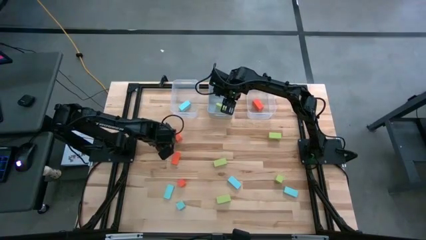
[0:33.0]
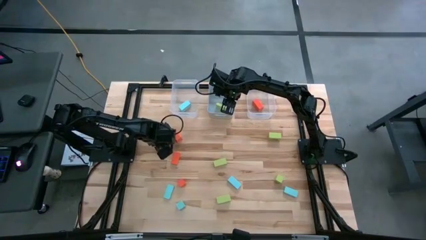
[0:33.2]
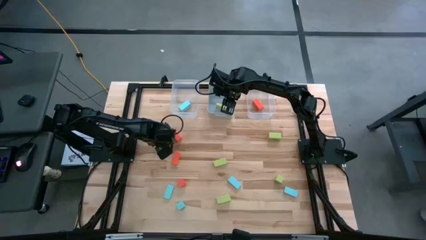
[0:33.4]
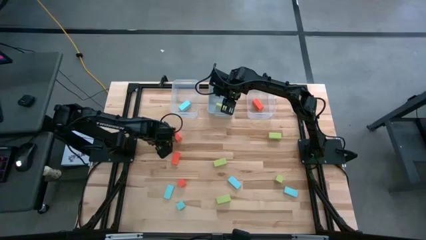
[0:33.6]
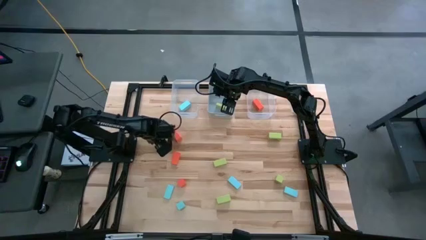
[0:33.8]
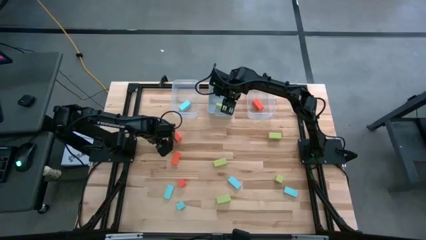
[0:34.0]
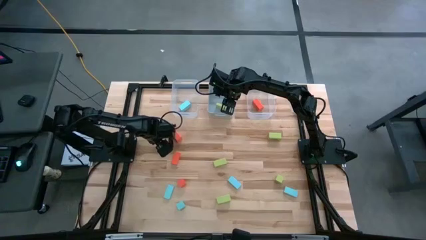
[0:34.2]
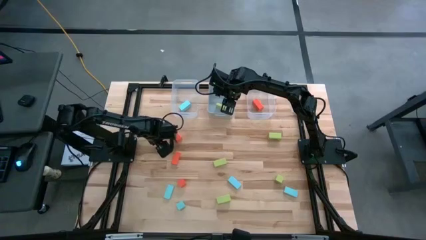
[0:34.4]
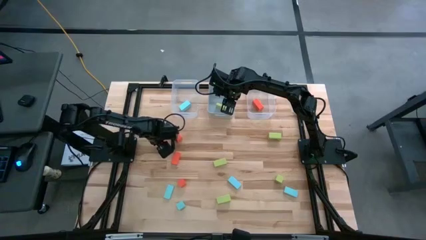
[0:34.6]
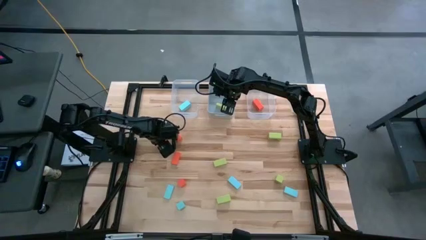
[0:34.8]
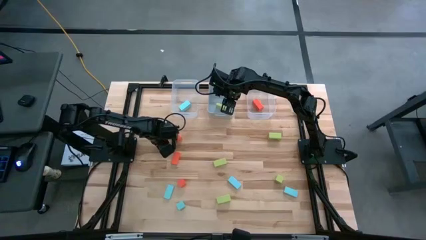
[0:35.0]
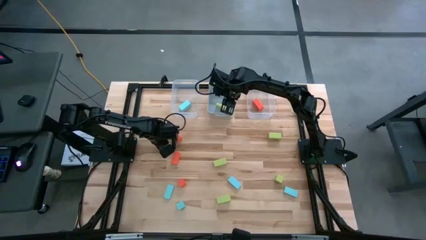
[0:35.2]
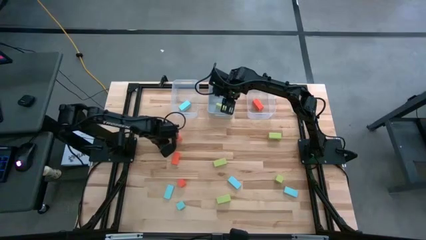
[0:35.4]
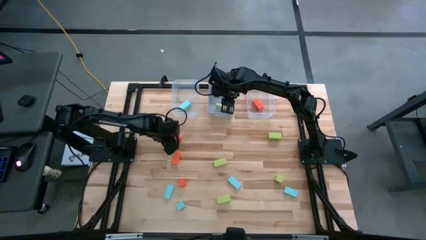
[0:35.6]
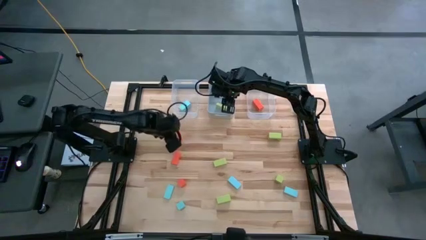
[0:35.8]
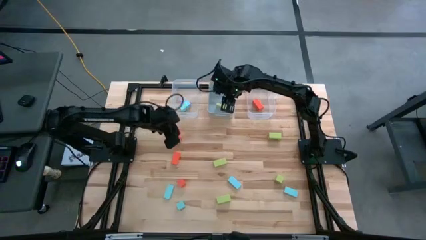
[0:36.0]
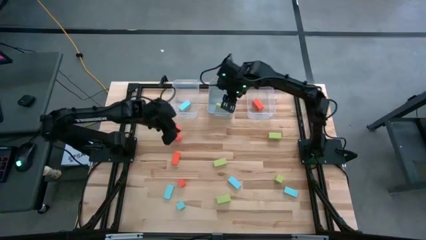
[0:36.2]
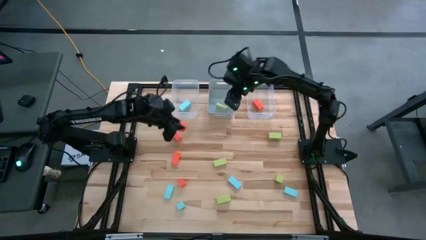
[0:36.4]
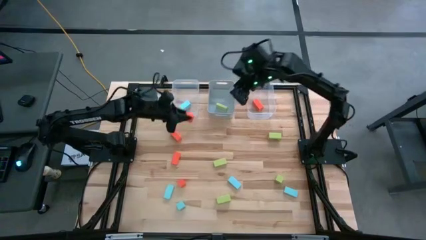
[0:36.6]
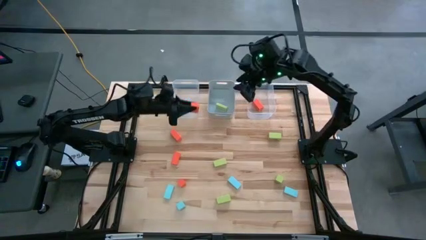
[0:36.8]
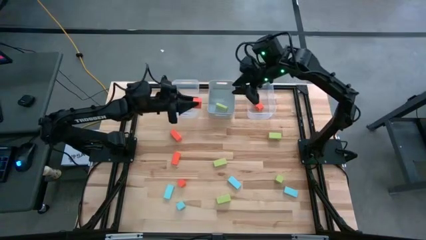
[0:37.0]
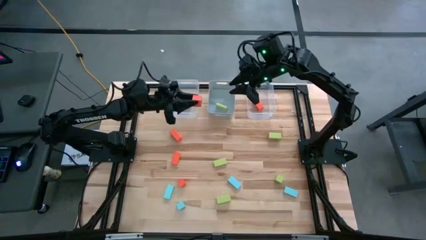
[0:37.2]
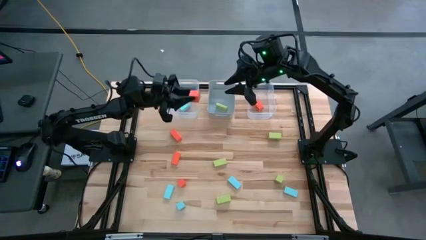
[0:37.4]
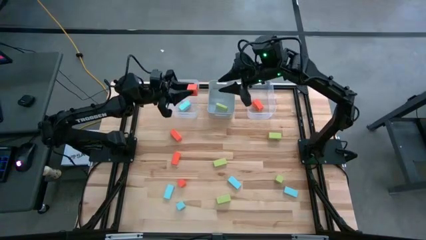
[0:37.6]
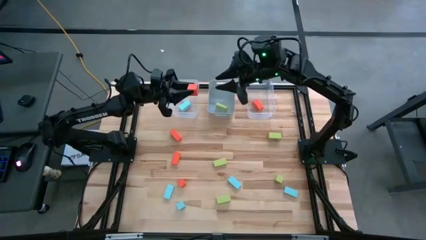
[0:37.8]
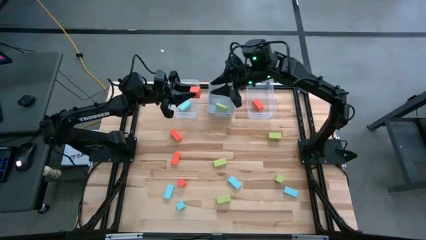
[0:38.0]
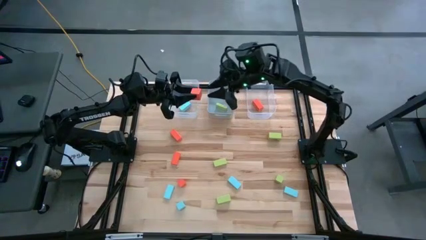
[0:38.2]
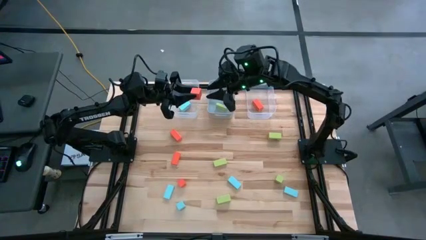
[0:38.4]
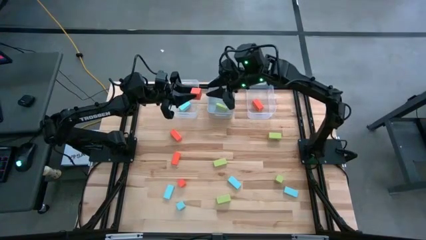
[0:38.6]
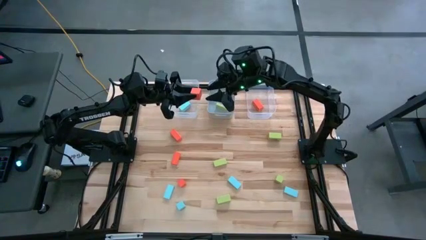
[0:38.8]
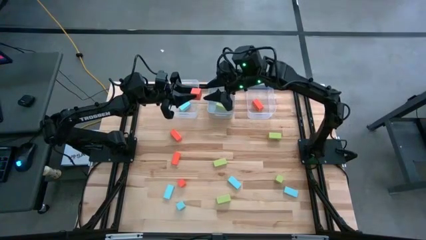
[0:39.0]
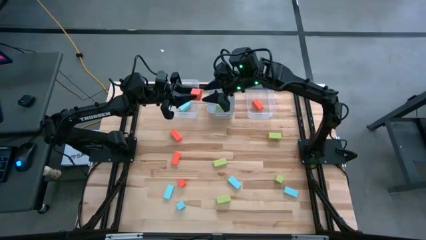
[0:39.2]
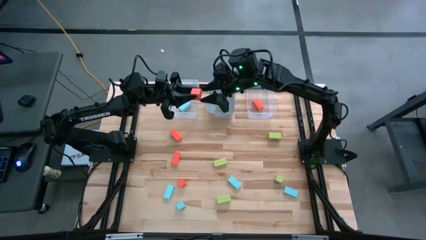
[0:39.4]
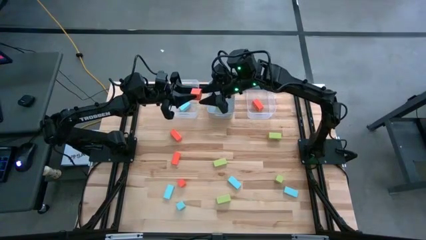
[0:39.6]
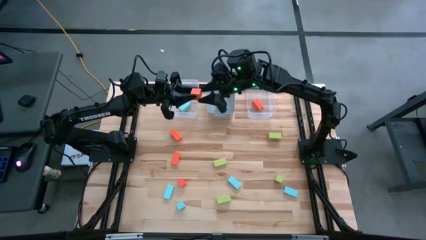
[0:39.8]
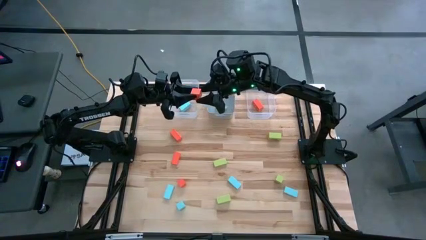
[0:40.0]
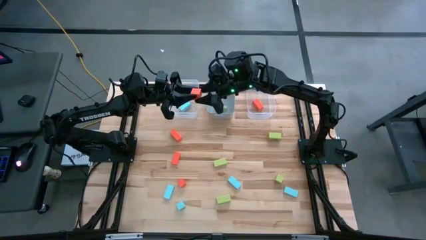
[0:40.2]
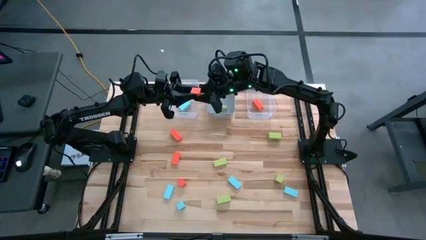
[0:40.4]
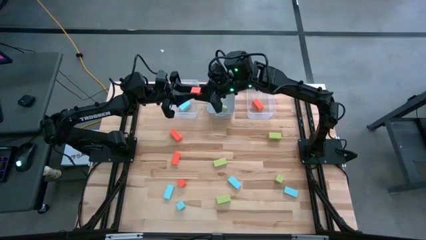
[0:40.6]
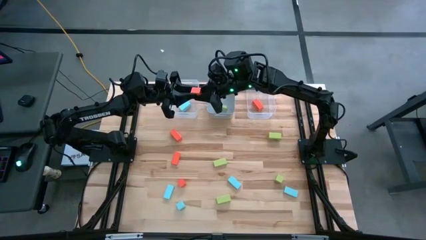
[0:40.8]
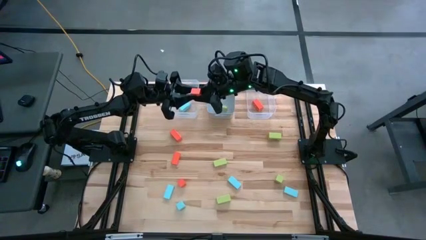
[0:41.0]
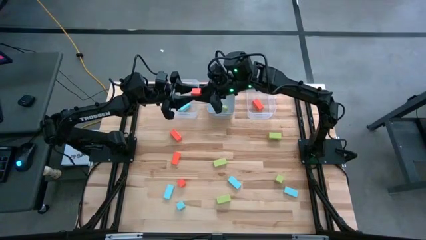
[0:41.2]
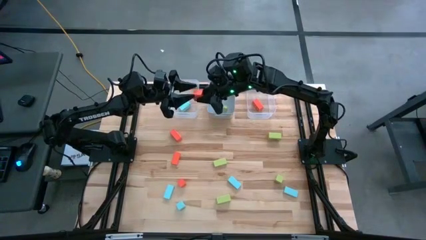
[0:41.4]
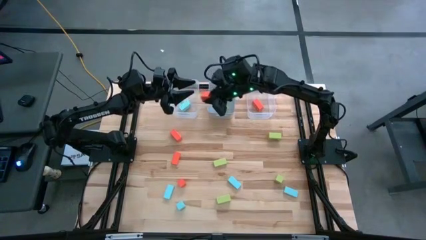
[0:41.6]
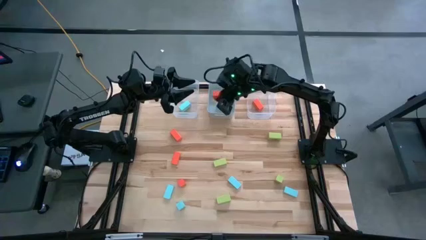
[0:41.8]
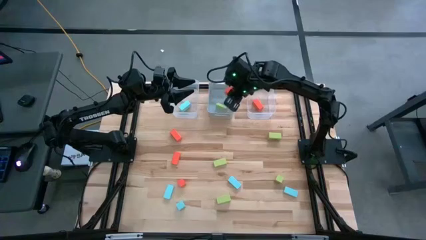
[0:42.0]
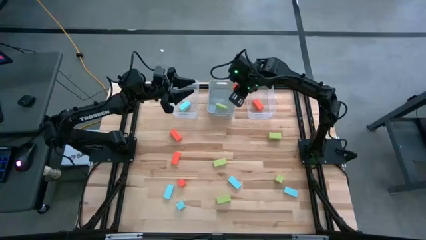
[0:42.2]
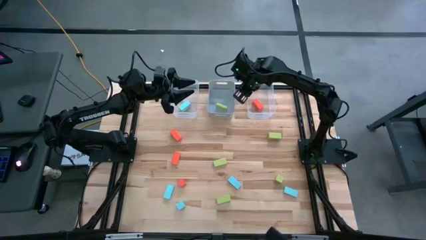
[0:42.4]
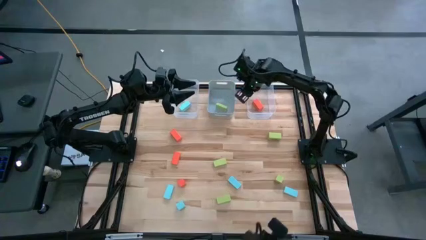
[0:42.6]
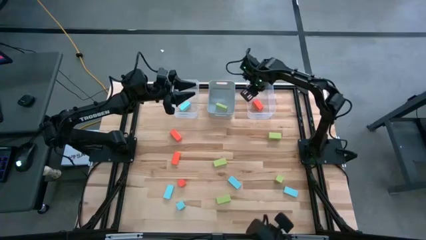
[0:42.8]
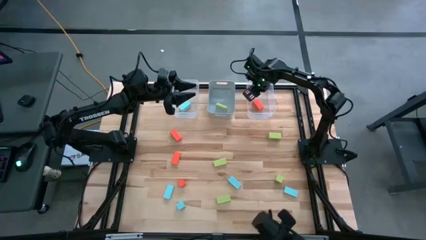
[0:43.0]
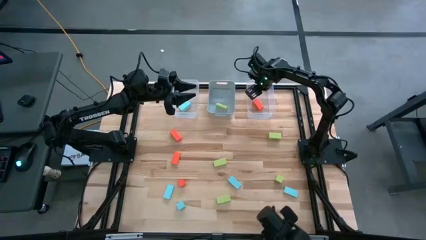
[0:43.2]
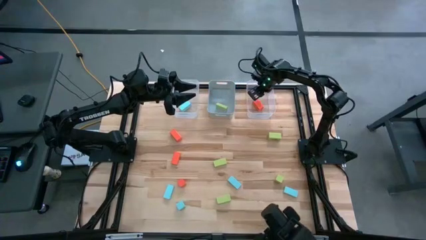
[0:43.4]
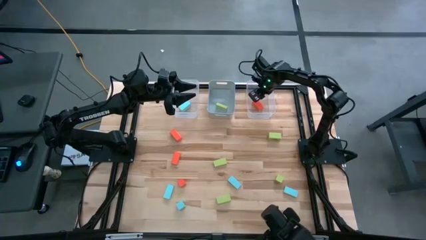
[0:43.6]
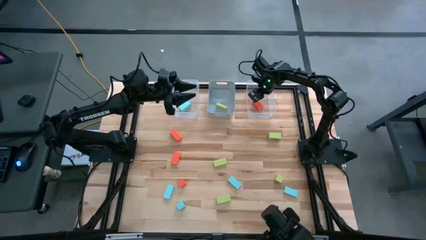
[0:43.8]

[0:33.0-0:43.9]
Task: Sort & place blocks by color
Put the orange block into the right transparent bin

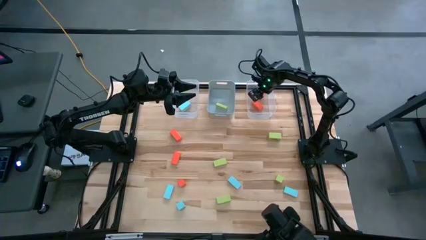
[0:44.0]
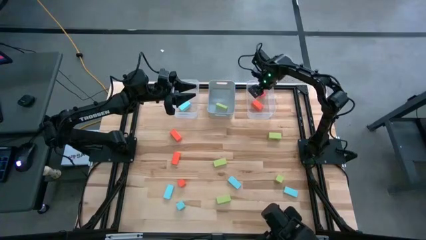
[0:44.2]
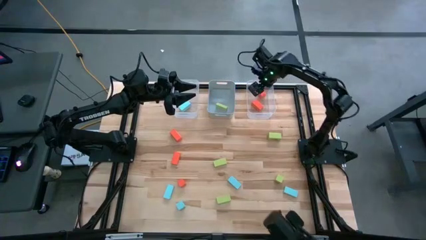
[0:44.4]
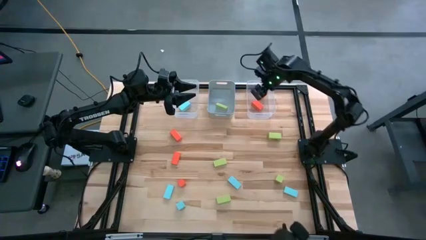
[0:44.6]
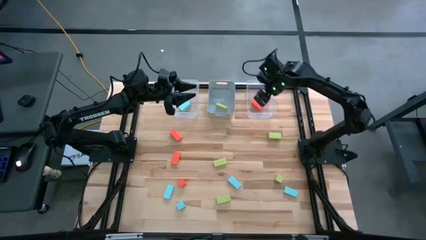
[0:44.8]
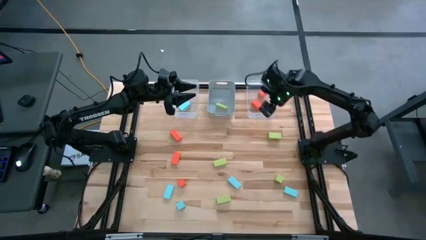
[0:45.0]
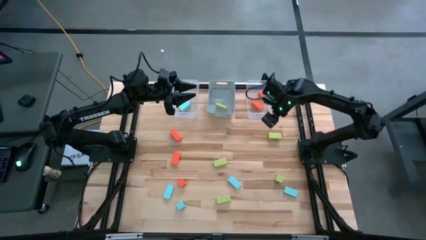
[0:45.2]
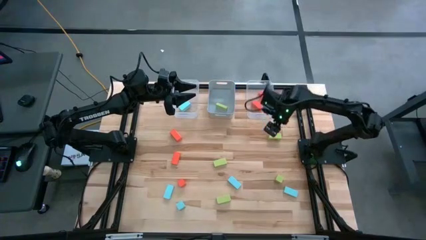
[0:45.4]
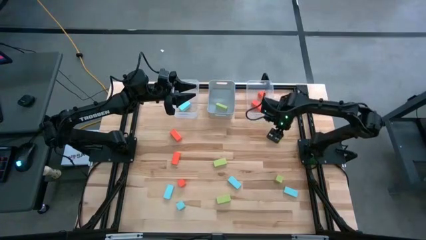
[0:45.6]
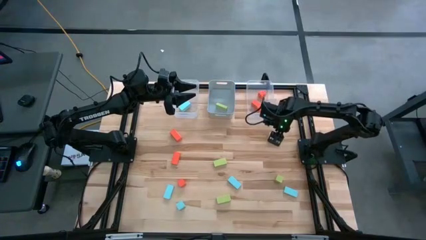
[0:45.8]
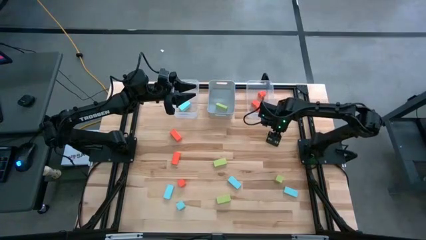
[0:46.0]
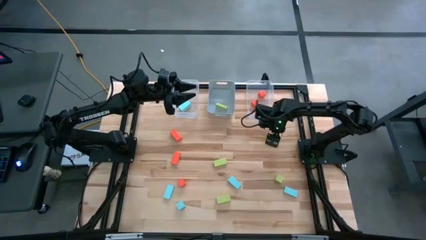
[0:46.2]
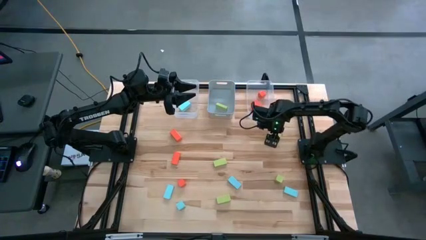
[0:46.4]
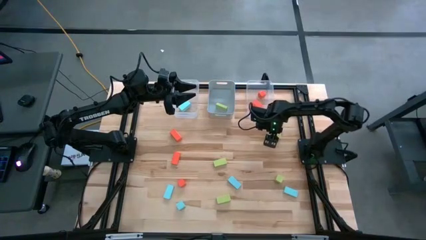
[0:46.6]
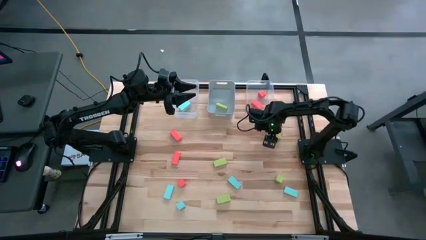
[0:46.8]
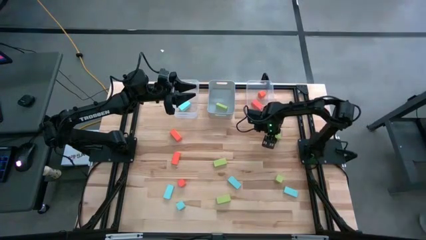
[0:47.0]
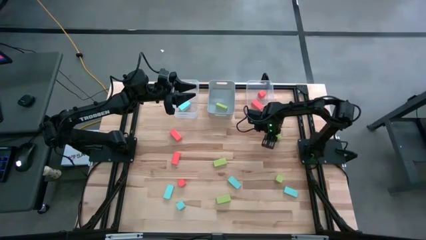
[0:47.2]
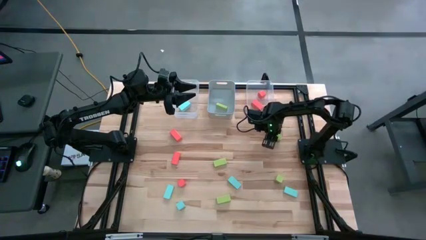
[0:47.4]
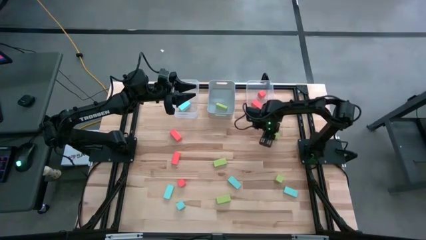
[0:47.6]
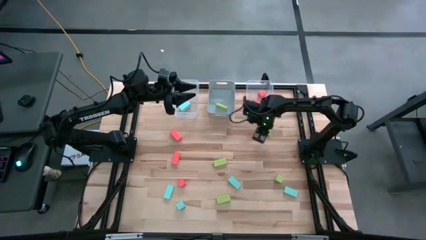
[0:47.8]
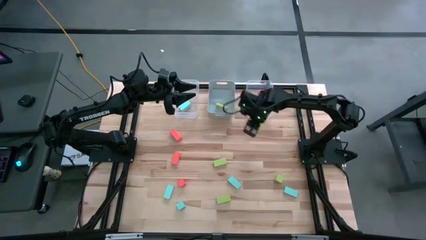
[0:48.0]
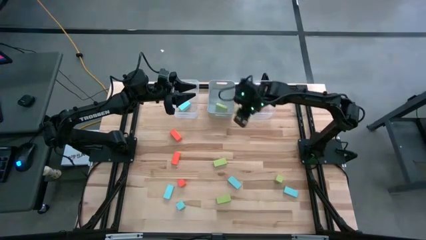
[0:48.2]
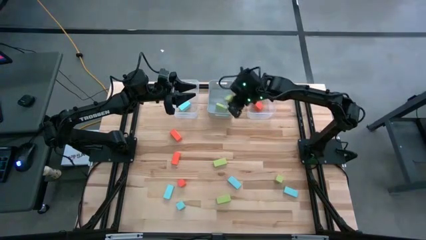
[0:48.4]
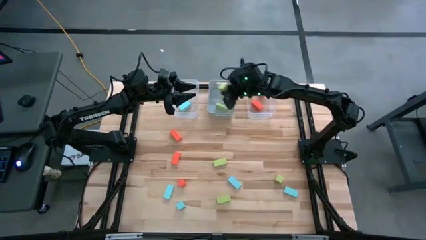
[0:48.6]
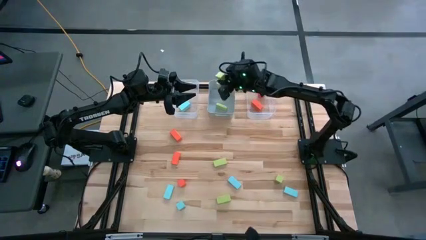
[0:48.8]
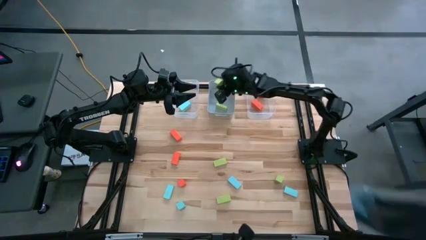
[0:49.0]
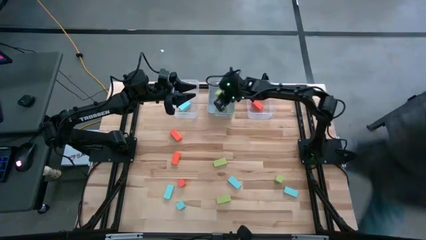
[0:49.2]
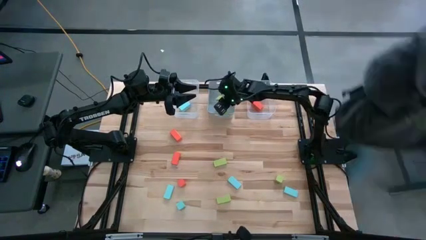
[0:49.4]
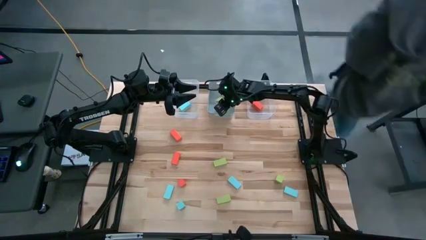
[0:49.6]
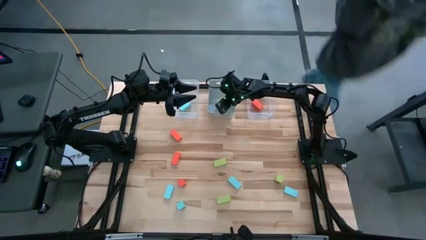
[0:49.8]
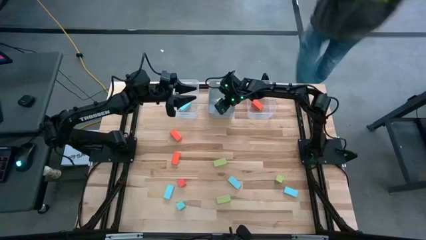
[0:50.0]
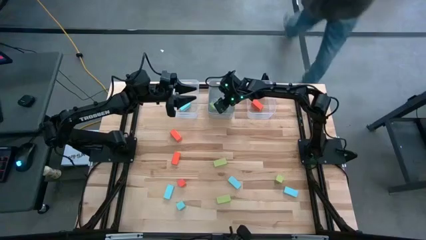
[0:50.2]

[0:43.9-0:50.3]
Put the green block into the blue bin
